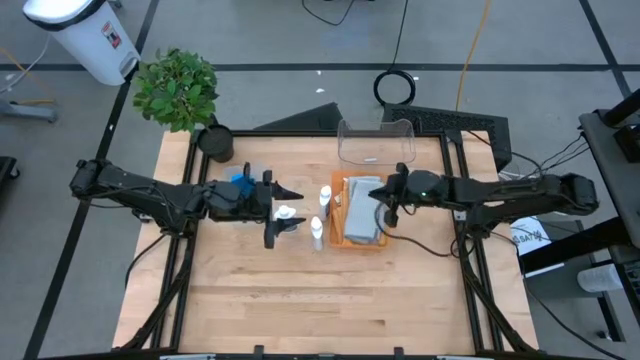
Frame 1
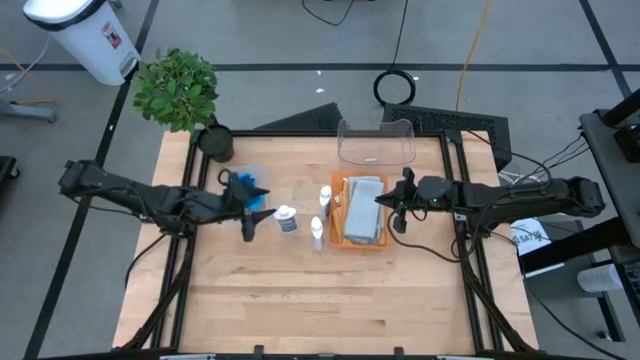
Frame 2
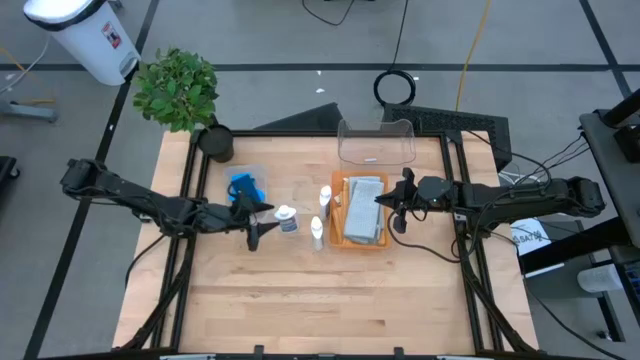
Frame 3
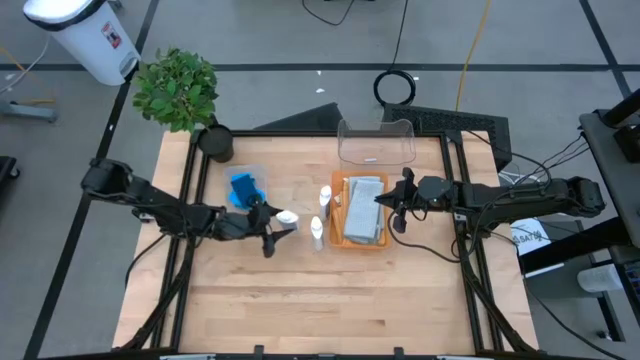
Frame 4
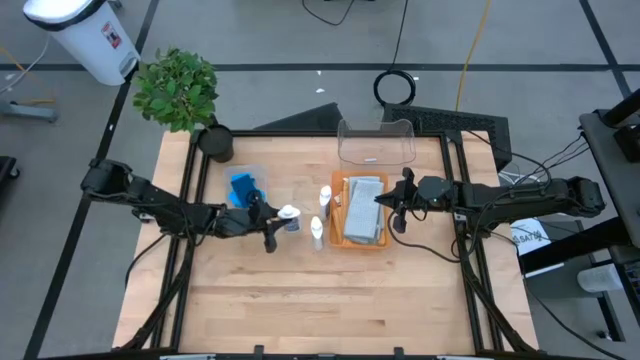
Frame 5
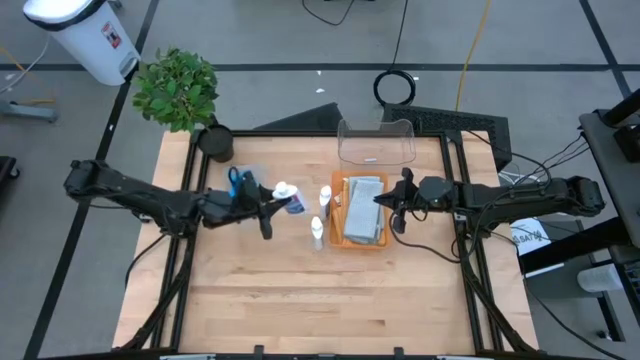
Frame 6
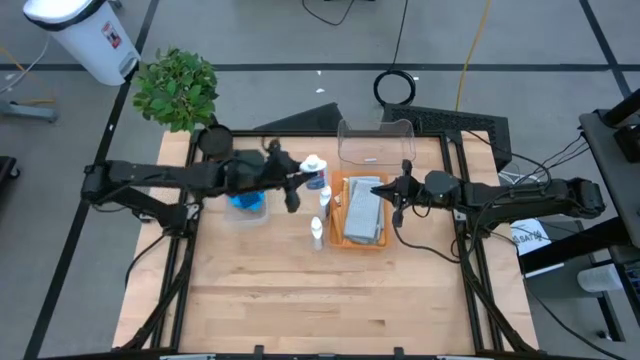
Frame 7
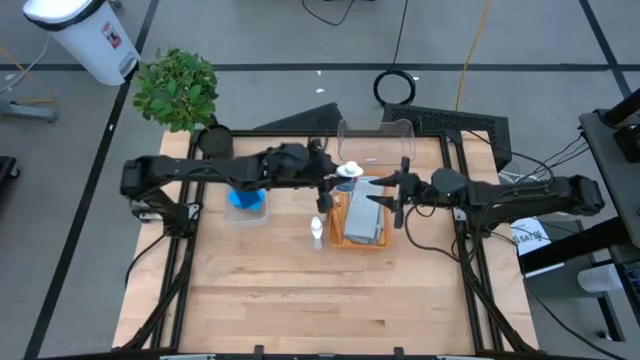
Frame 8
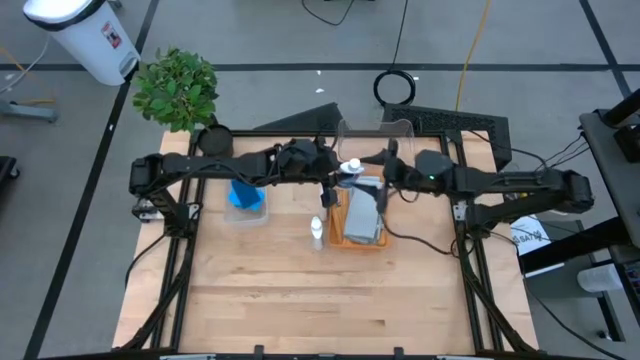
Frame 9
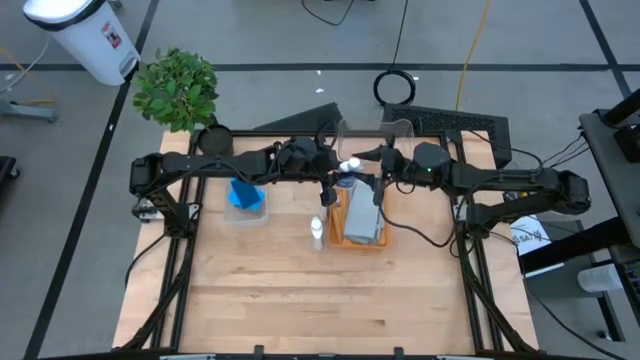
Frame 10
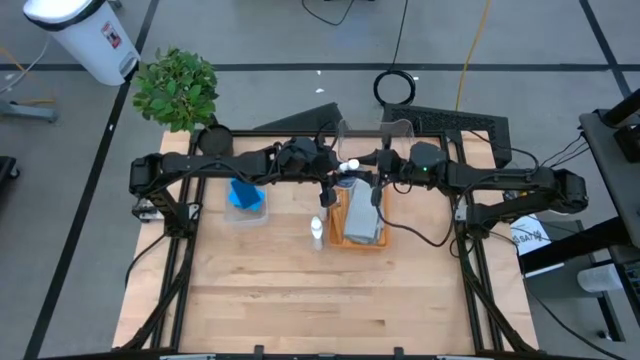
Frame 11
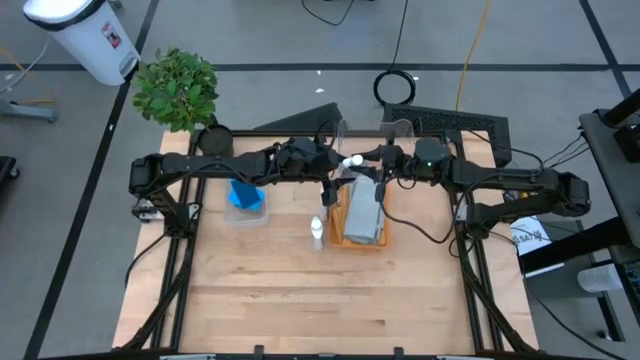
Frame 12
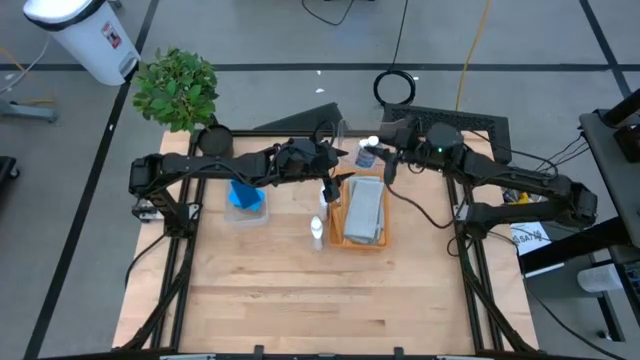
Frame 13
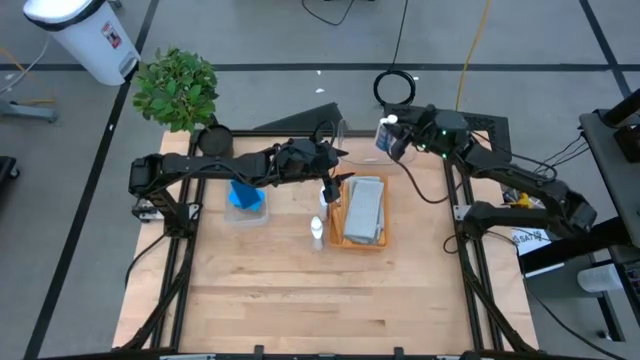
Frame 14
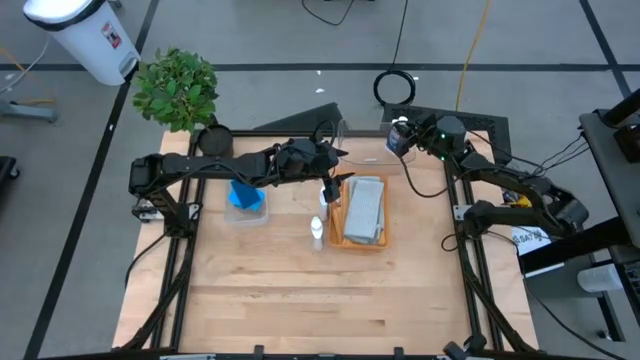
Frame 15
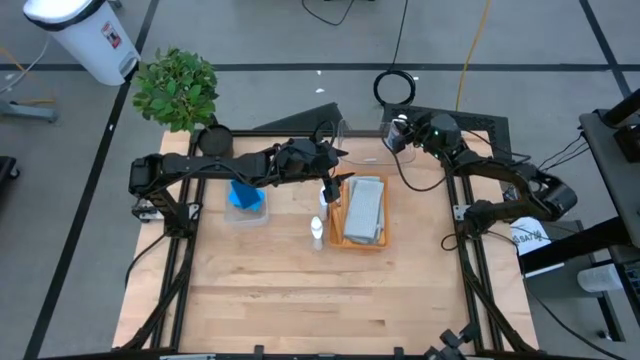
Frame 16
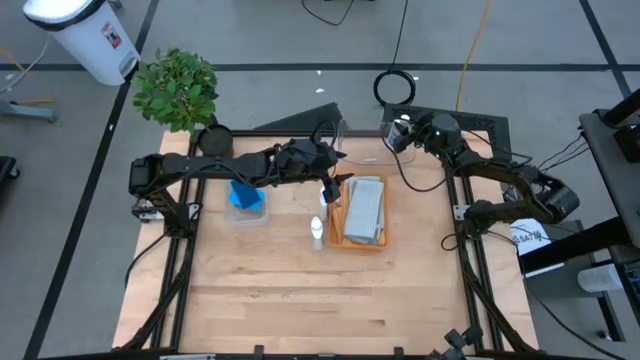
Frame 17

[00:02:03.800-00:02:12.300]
Task: Pick & Place Kitchen Items
Put the white plastic restorer bottle into the transparent bin

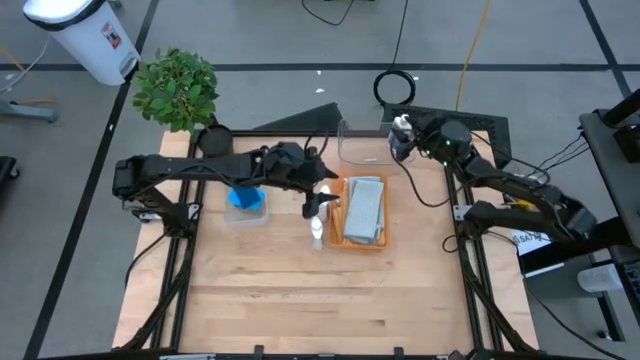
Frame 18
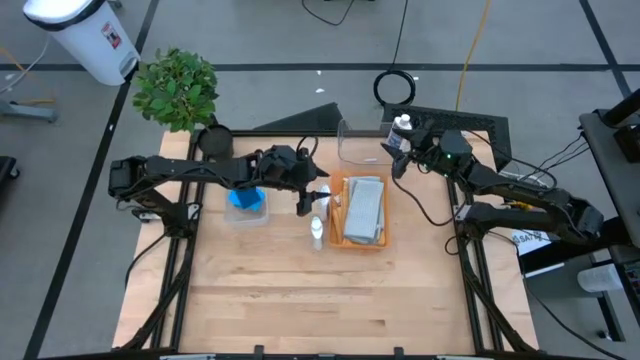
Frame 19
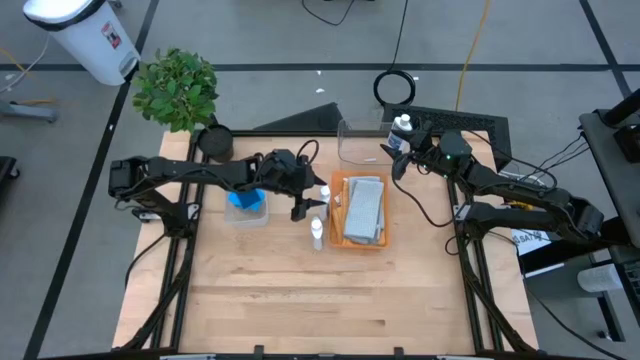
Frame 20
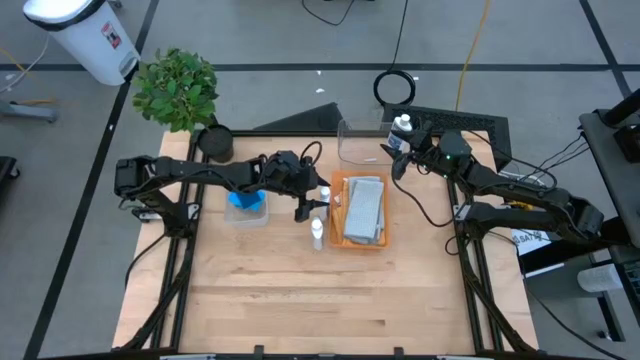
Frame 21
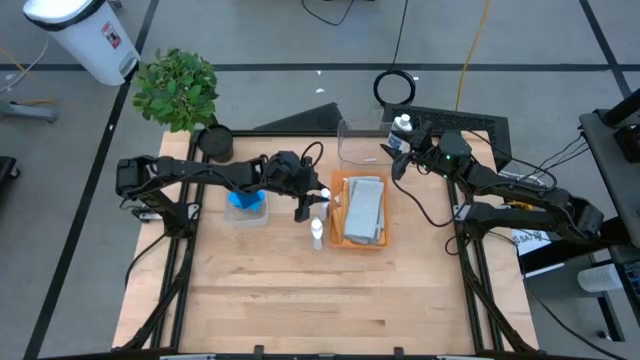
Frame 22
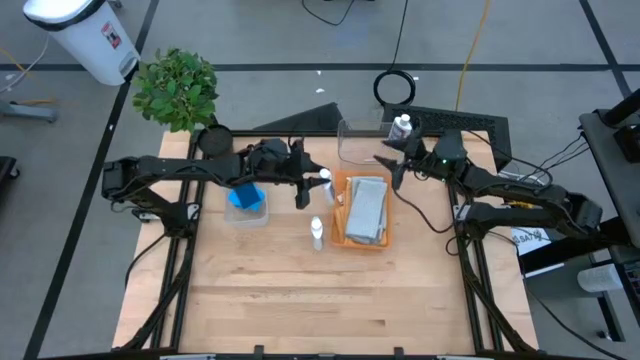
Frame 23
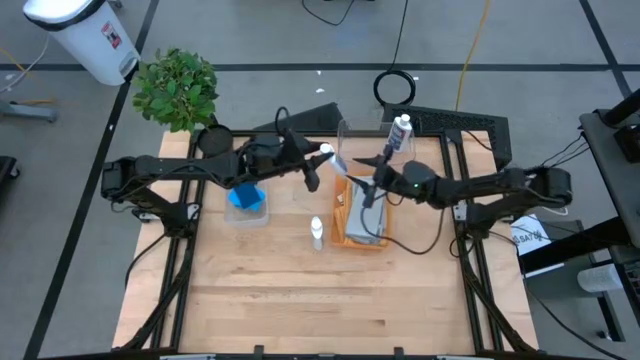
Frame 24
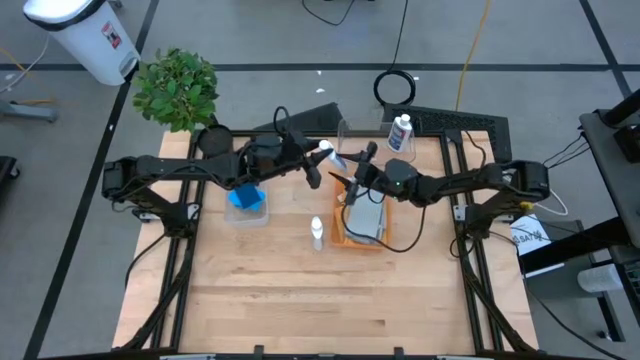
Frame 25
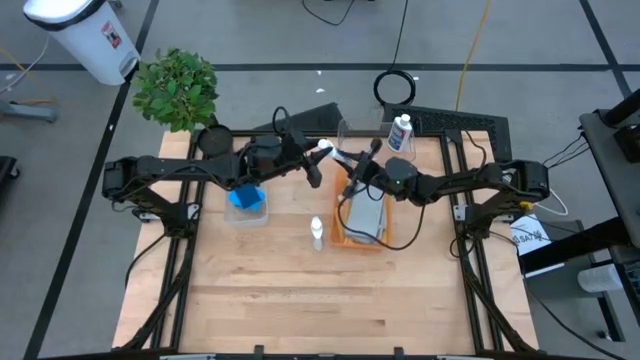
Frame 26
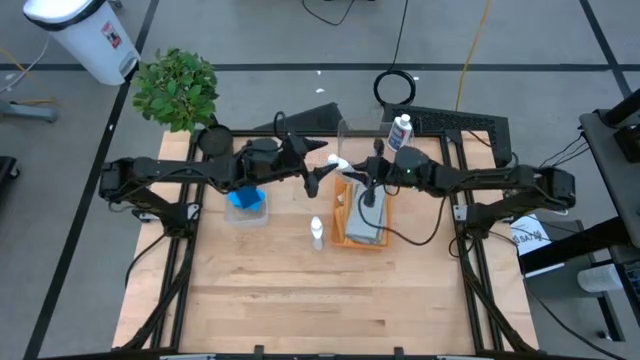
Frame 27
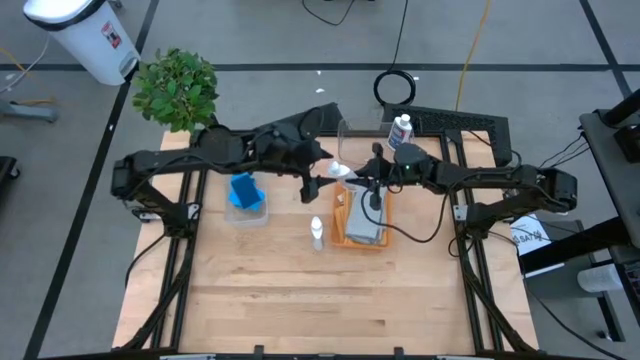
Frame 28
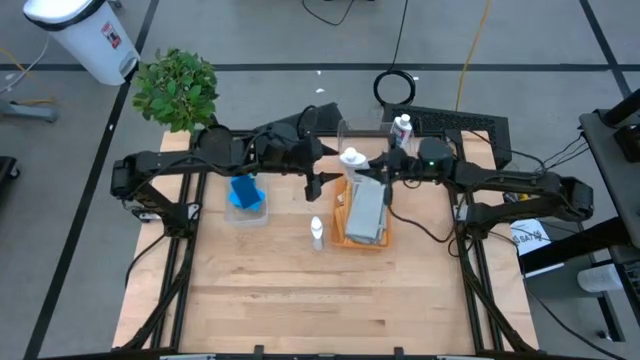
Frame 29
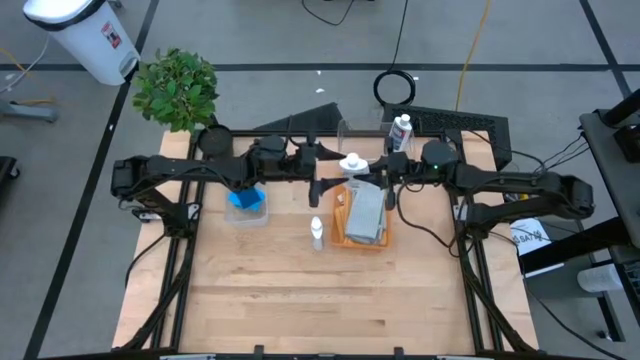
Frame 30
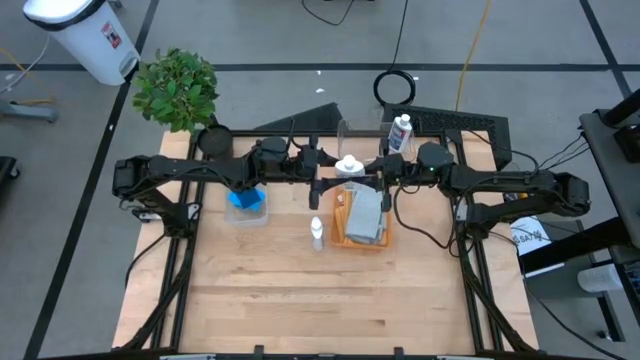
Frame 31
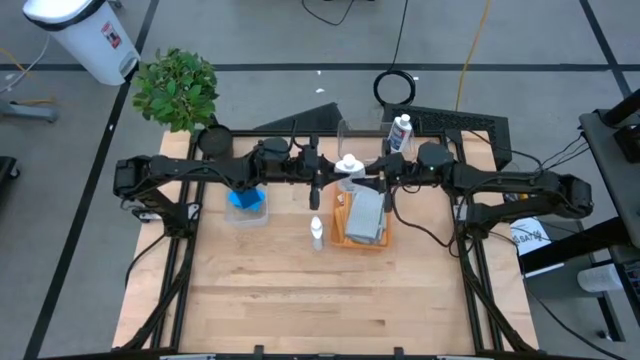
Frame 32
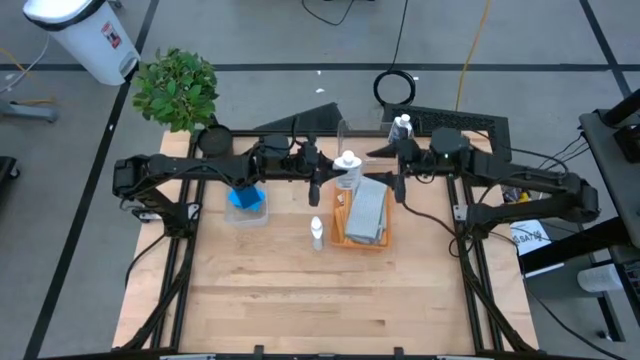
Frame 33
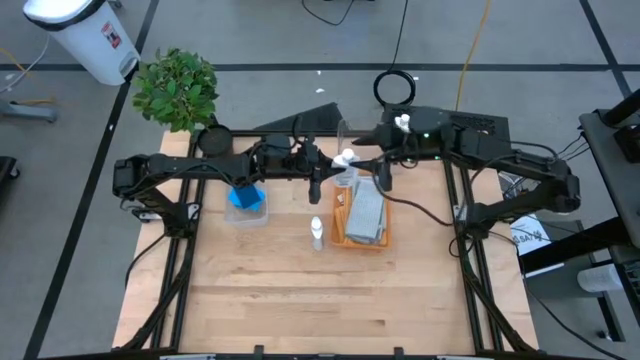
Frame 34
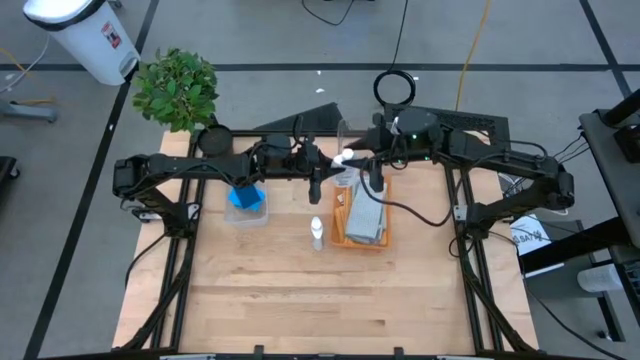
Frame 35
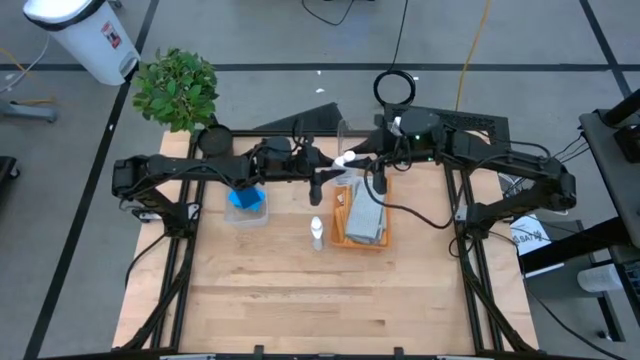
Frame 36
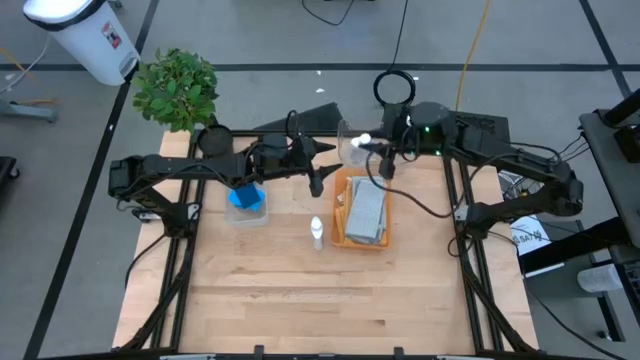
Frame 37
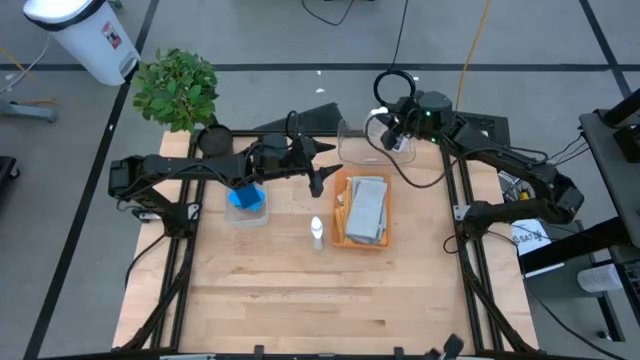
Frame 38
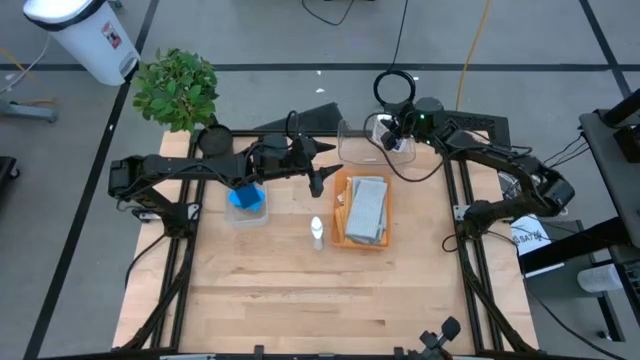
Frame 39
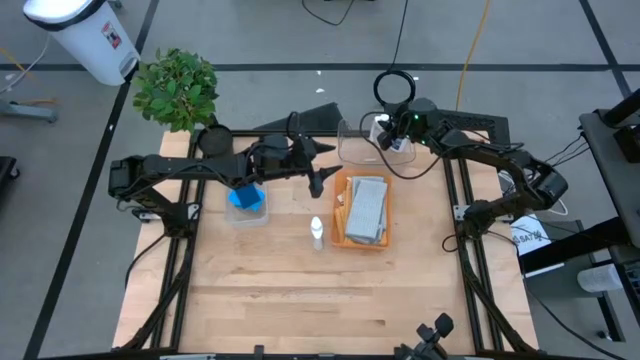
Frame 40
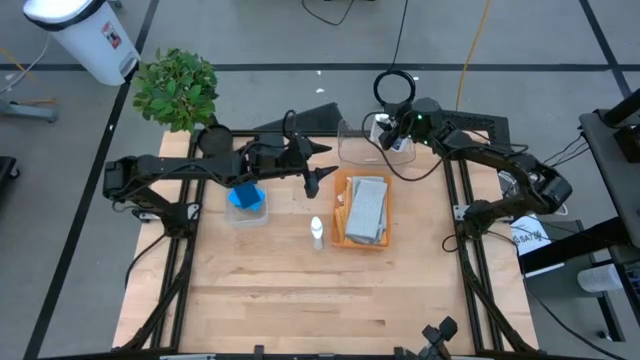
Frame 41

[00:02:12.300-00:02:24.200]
Put the white plastic restorer bottle into the transparent bin

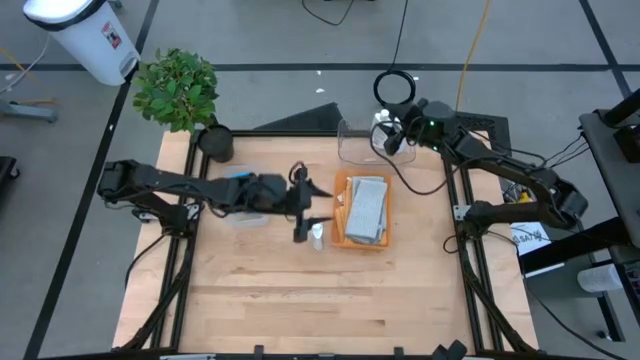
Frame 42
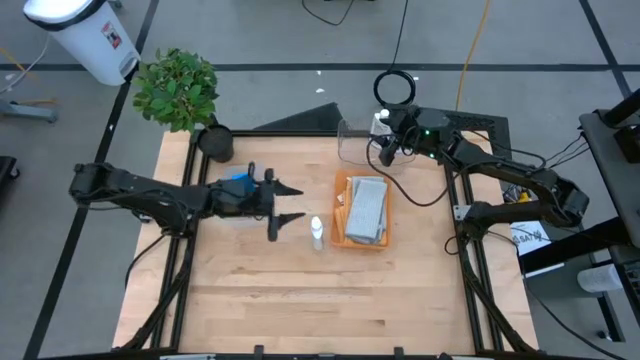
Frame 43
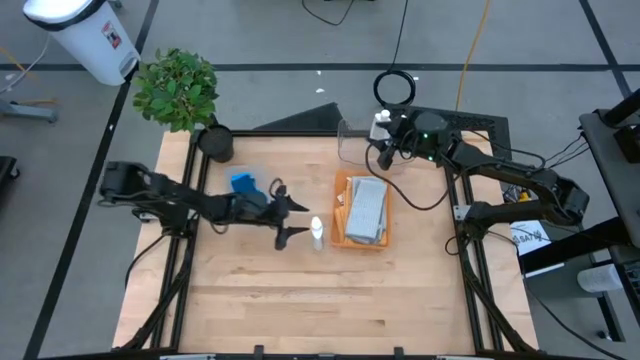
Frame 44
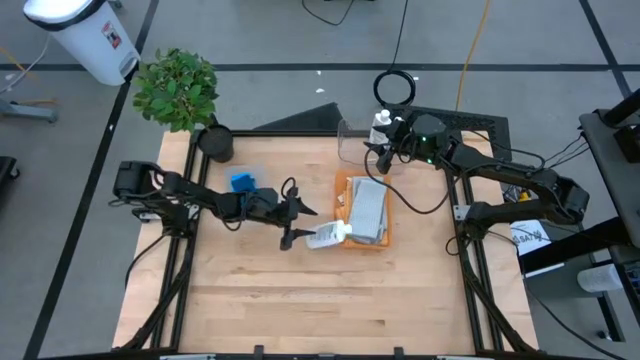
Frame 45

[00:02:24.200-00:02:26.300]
Put the white plastic restorer bottle into the transparent bin
